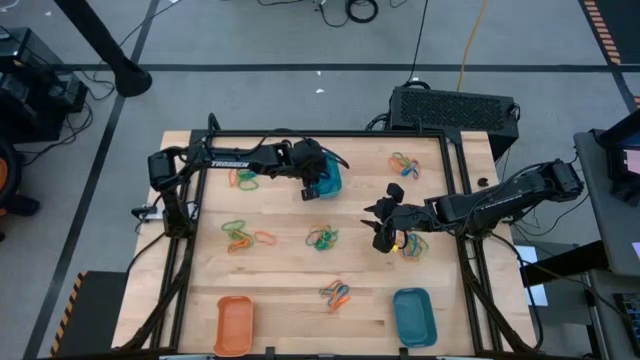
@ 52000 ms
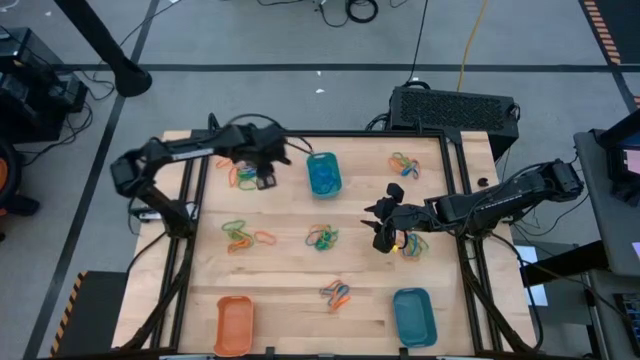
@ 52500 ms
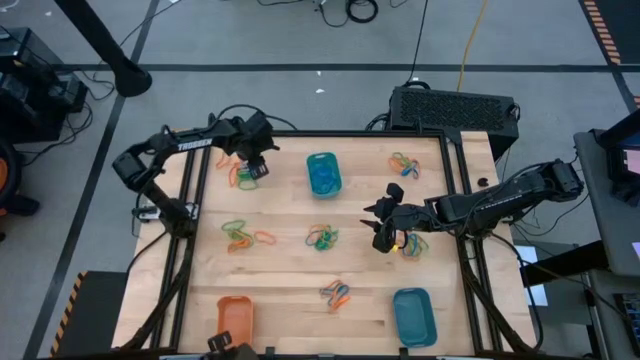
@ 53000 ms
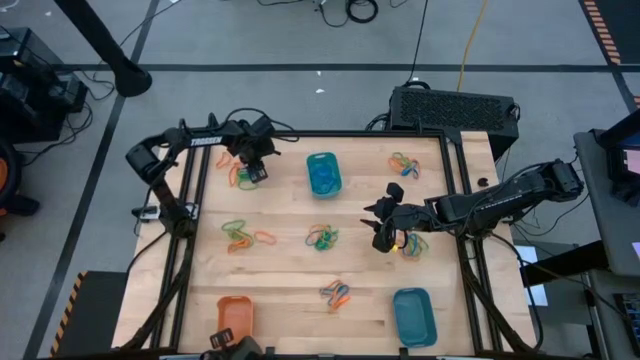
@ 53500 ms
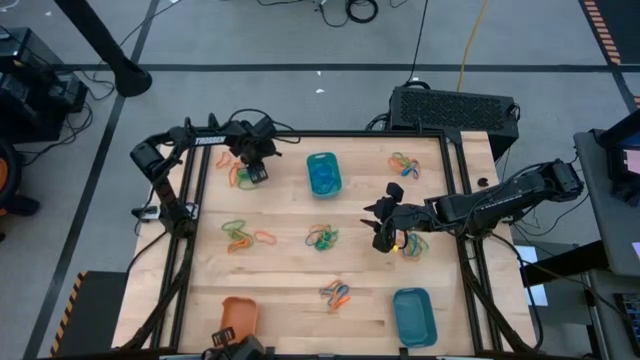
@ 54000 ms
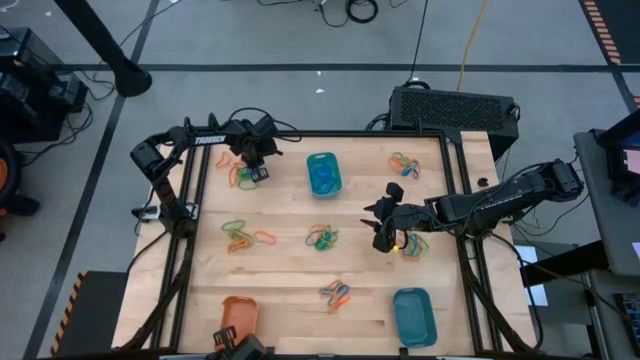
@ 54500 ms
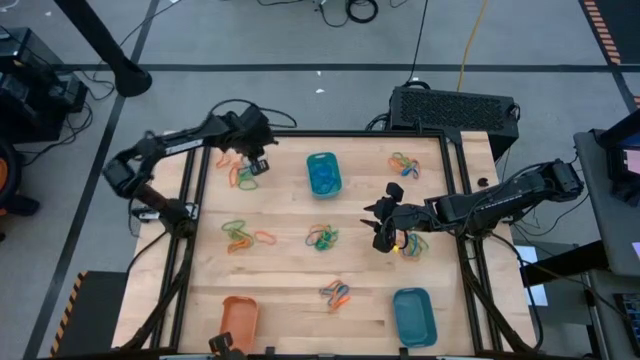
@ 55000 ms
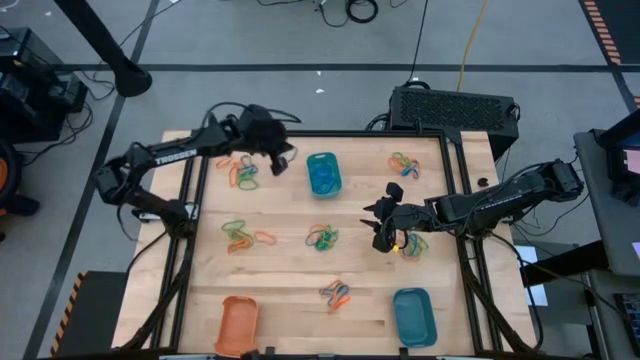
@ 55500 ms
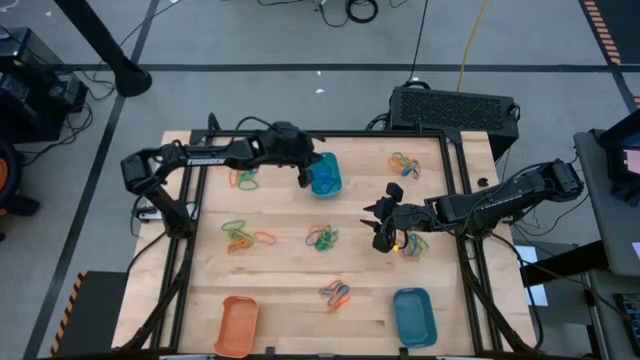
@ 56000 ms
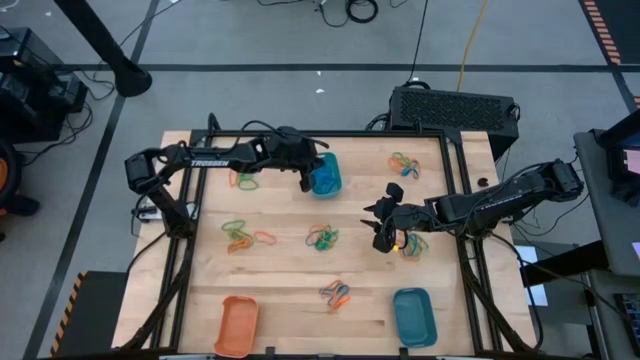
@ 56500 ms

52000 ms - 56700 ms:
Task: Sort rubber bands into baskets
Put the blue rubber band into the top blue bin

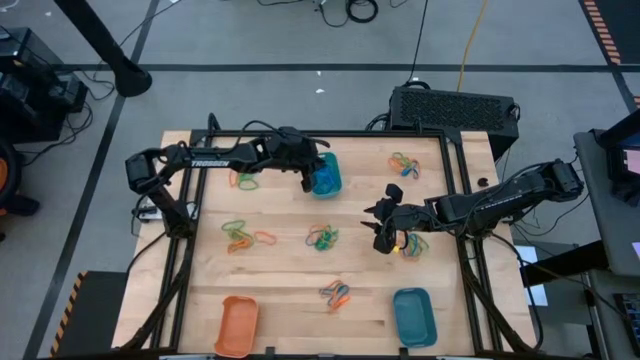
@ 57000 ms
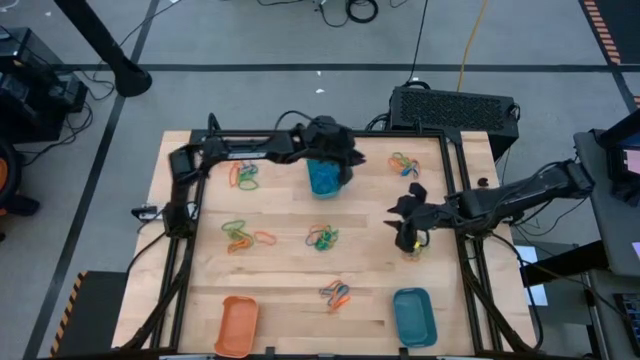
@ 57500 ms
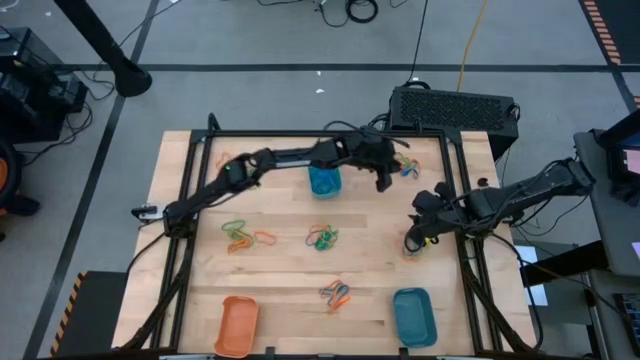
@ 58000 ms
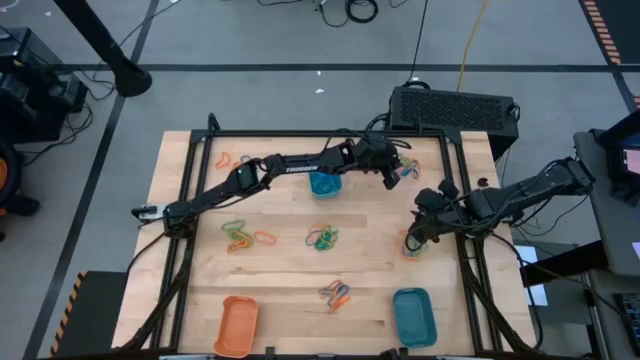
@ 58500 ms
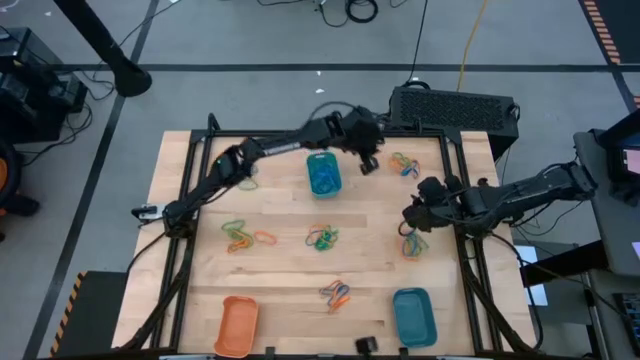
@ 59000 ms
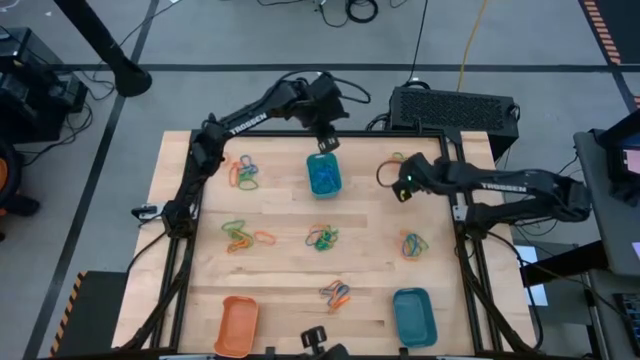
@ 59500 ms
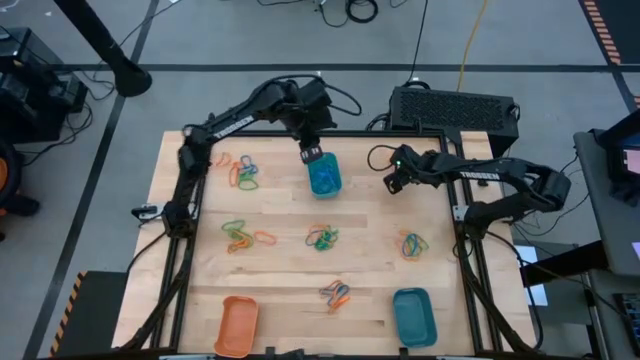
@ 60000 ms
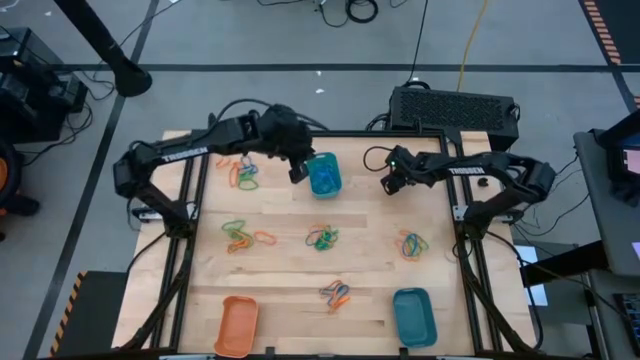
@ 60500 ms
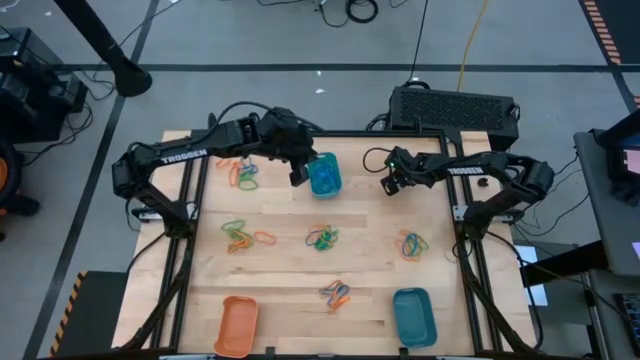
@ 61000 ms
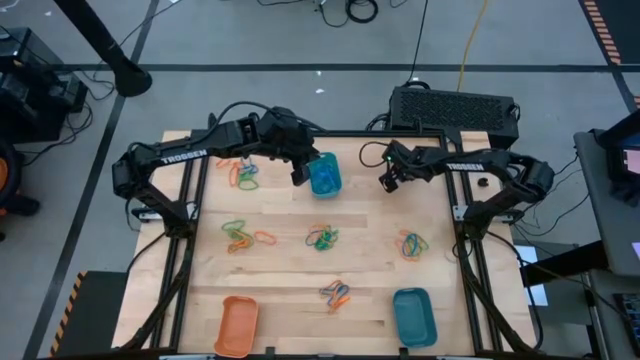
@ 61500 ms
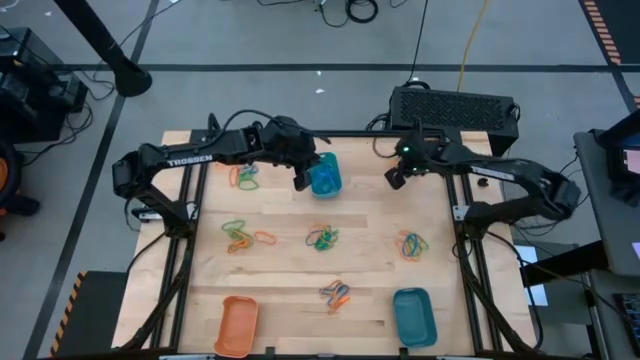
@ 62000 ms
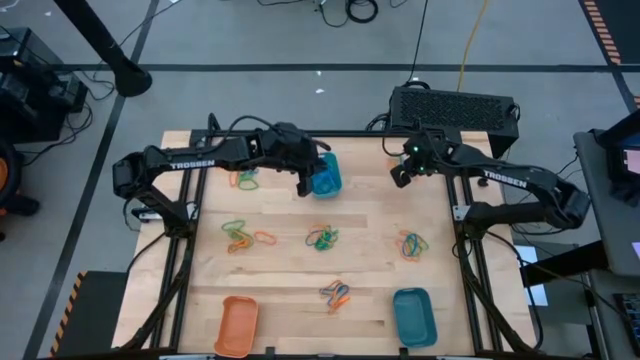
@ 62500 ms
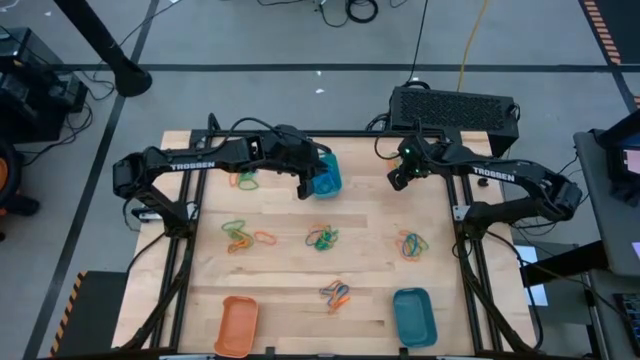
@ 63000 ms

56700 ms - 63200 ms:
Put the blue rubber band into the top blue bin

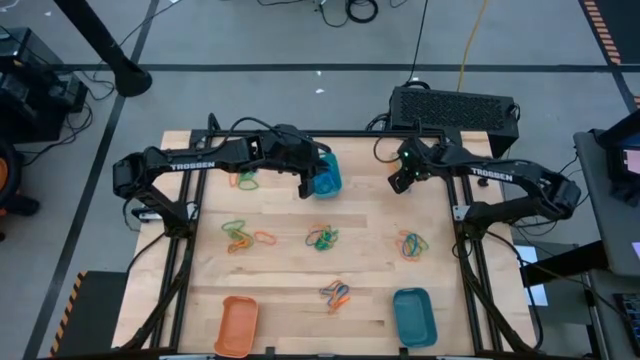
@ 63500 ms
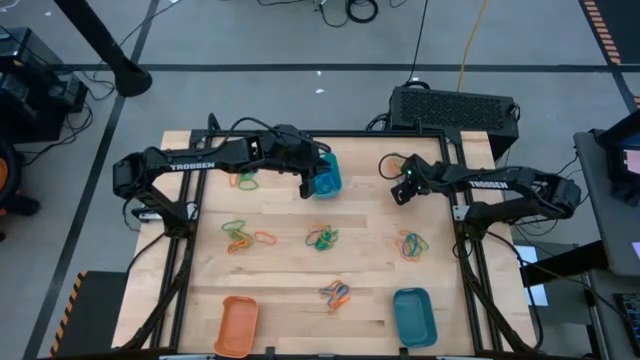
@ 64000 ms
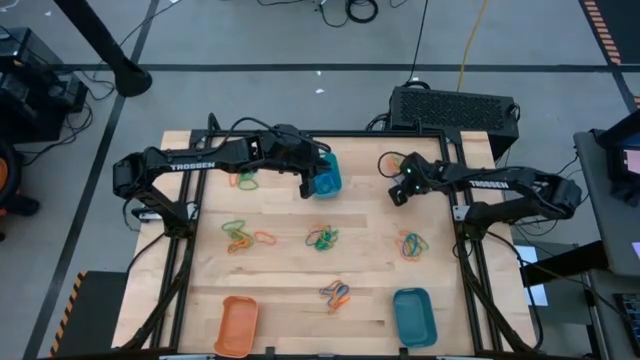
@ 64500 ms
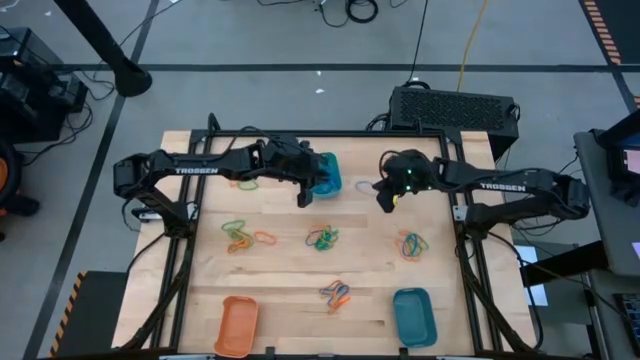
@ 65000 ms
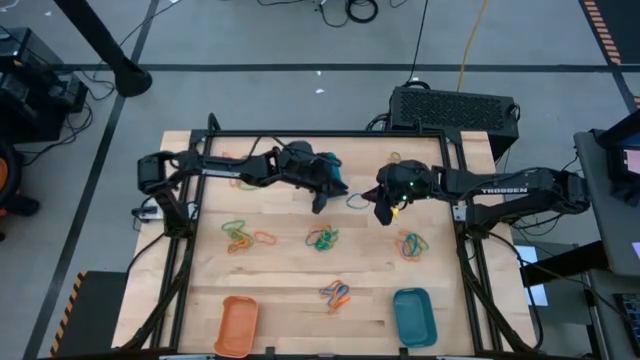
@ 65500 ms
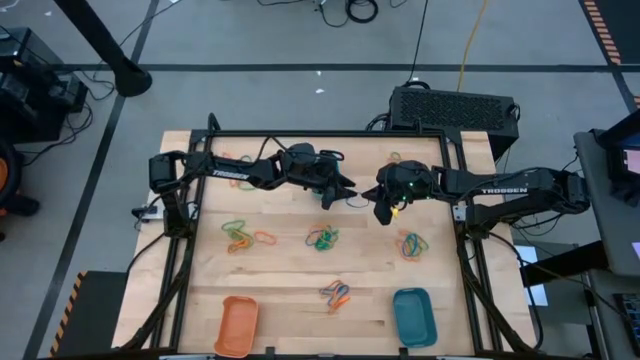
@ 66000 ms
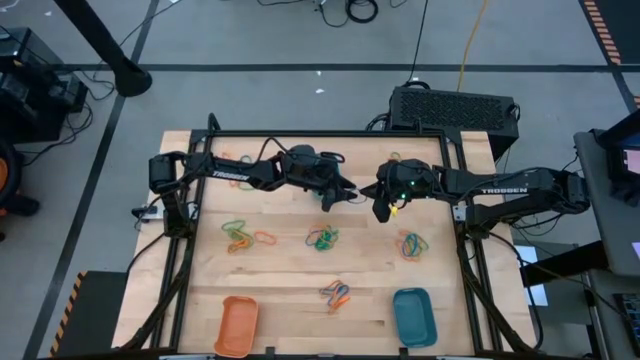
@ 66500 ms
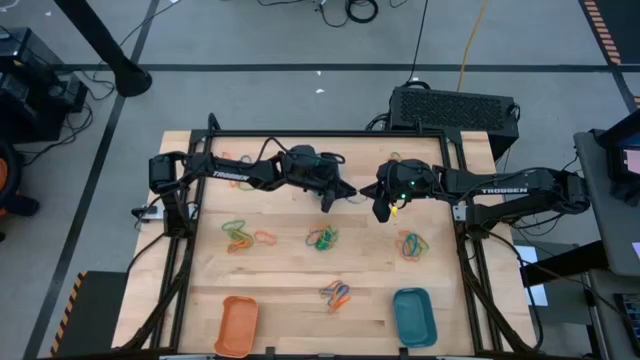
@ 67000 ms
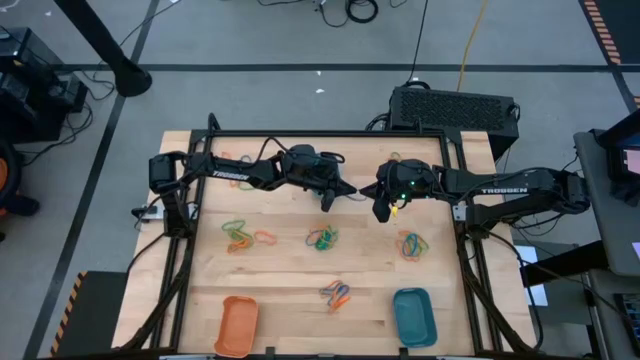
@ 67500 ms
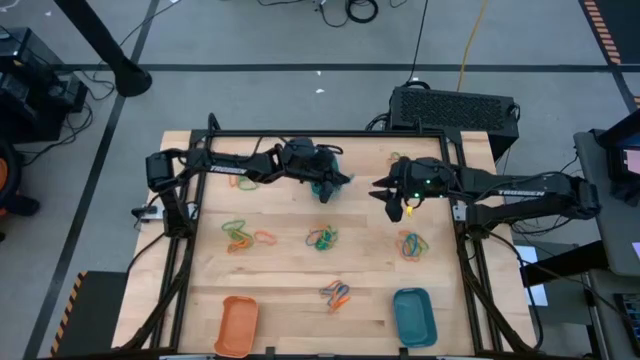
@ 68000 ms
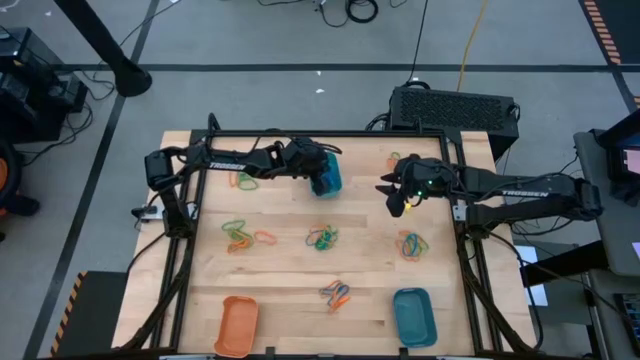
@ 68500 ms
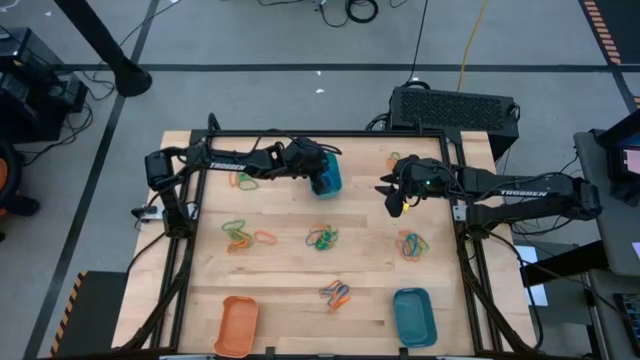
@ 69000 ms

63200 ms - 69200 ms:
Put the blue rubber band into the top blue bin

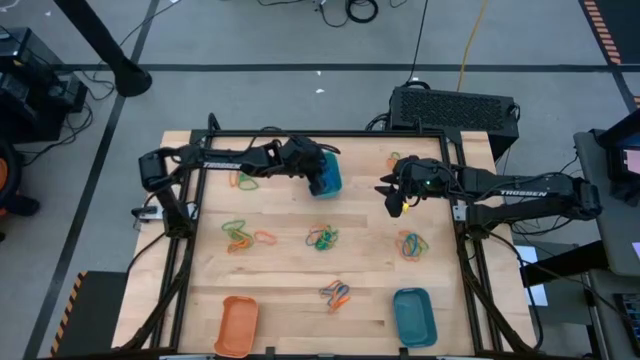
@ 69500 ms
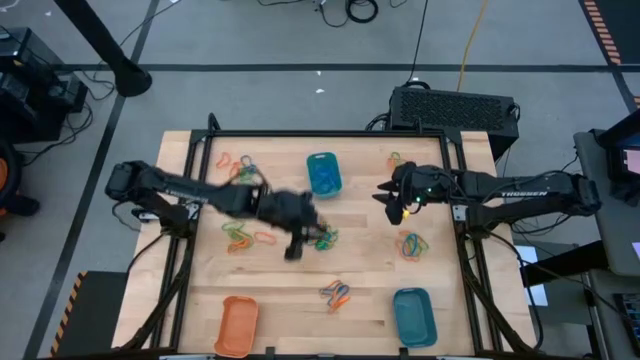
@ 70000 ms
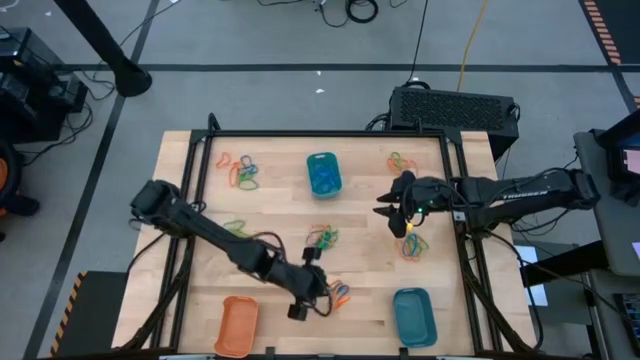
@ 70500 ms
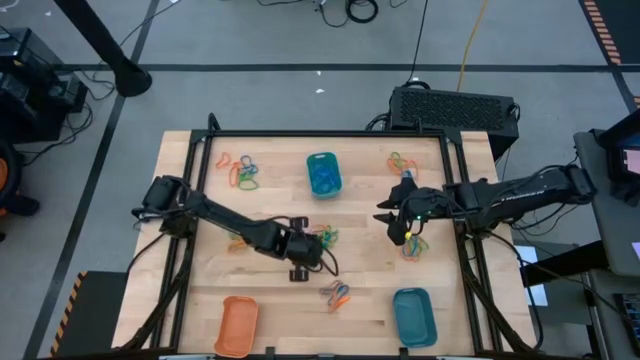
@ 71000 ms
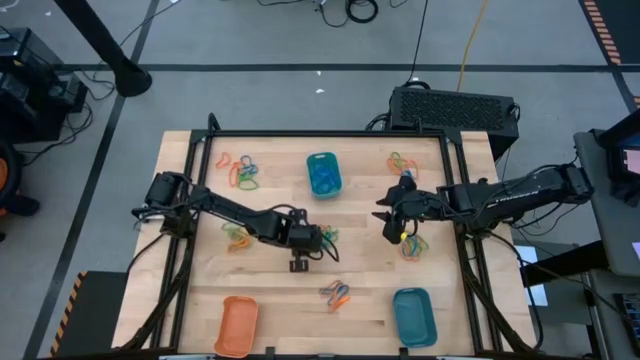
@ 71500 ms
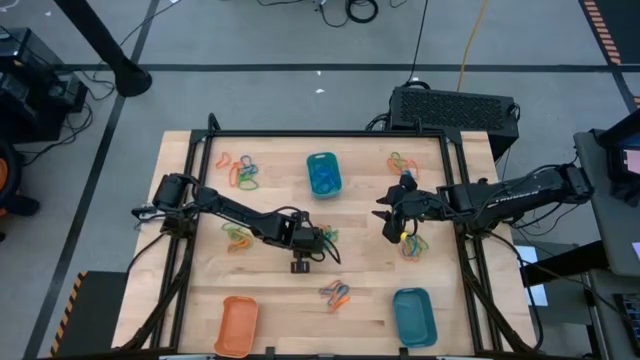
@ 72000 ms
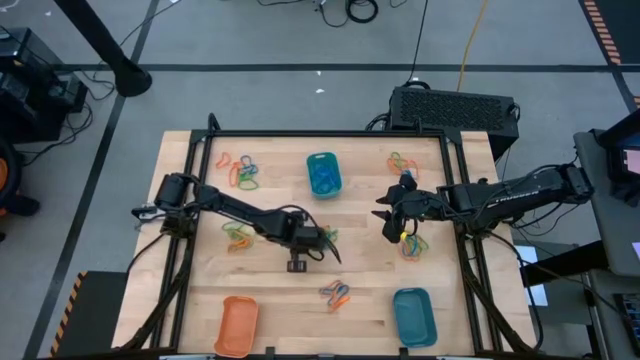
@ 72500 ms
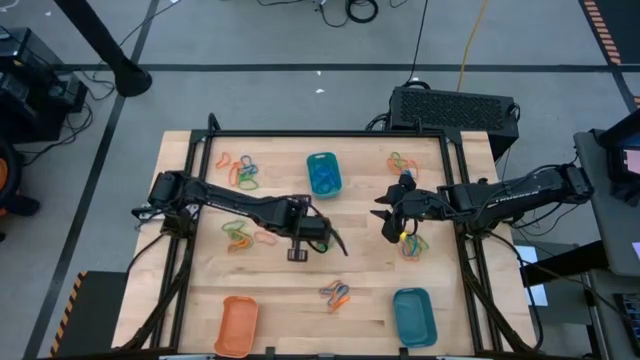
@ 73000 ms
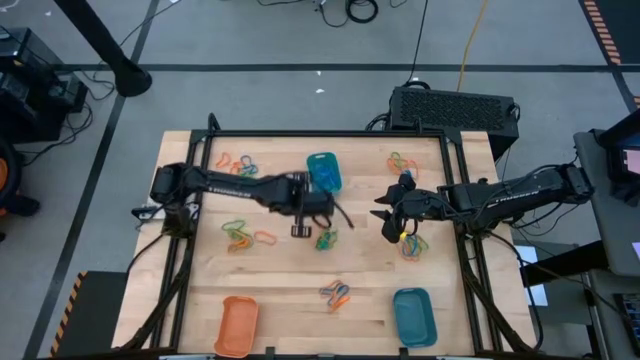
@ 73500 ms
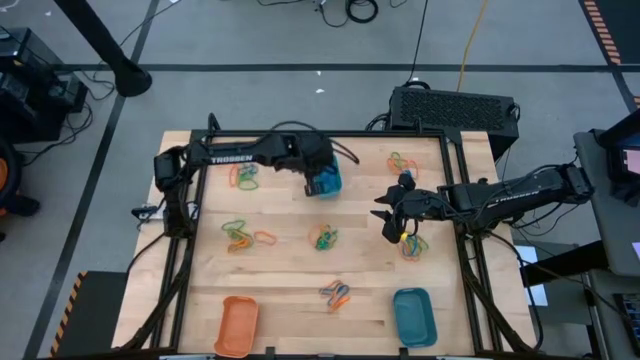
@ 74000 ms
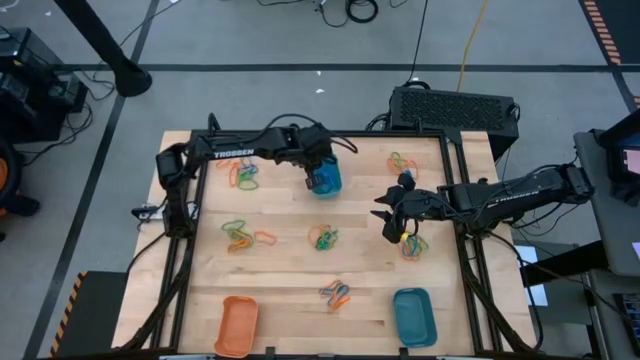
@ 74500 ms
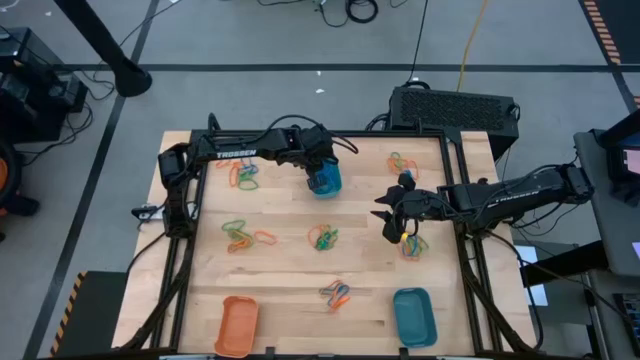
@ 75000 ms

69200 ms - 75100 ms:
Put the blue rubber band into the top blue bin
